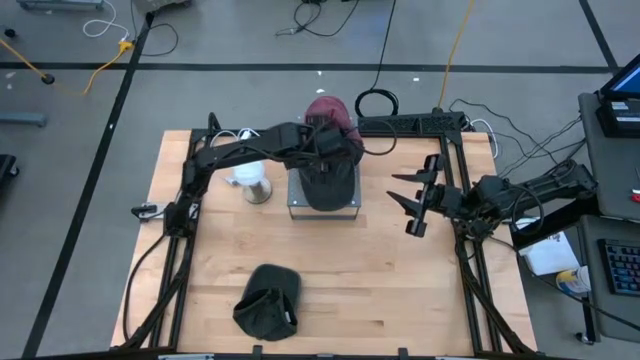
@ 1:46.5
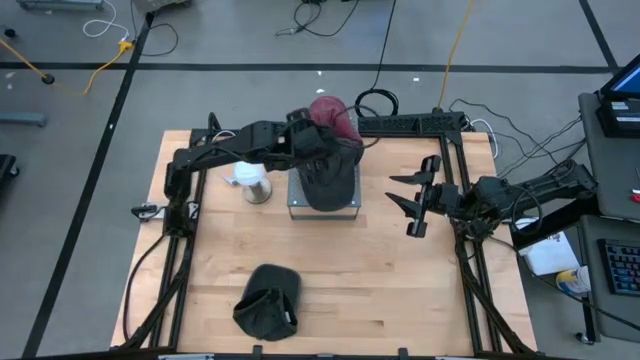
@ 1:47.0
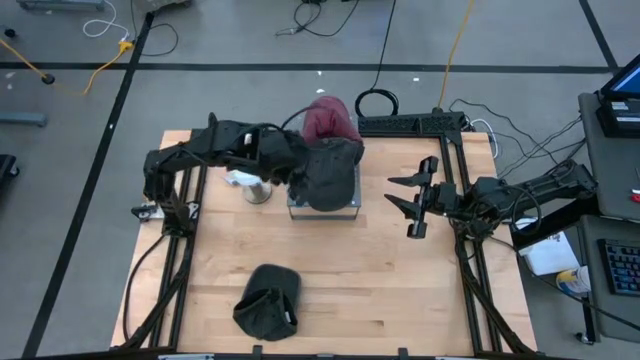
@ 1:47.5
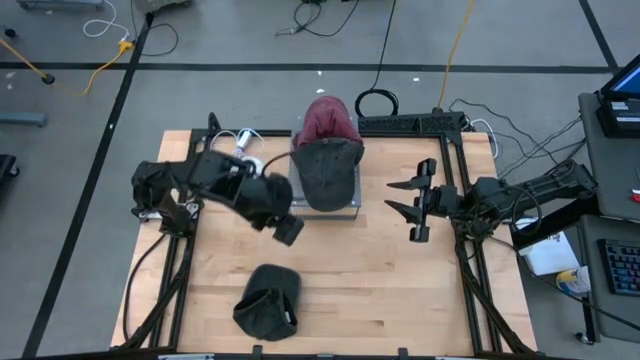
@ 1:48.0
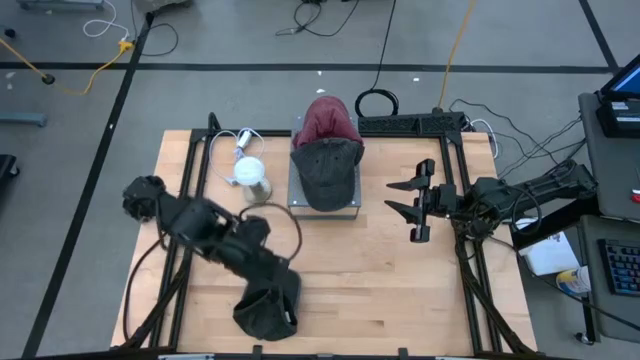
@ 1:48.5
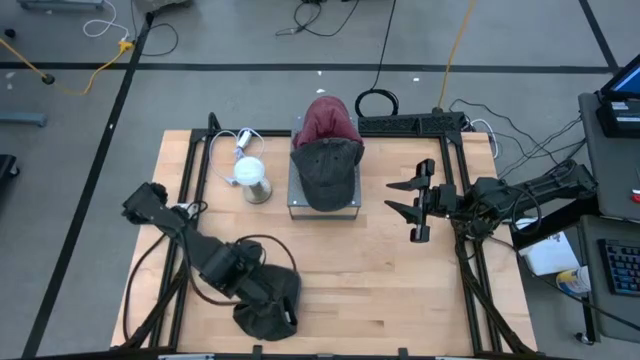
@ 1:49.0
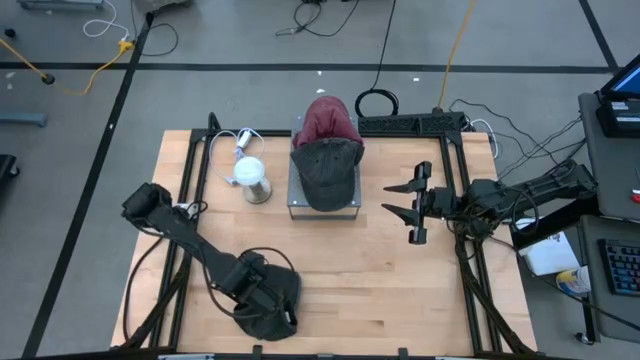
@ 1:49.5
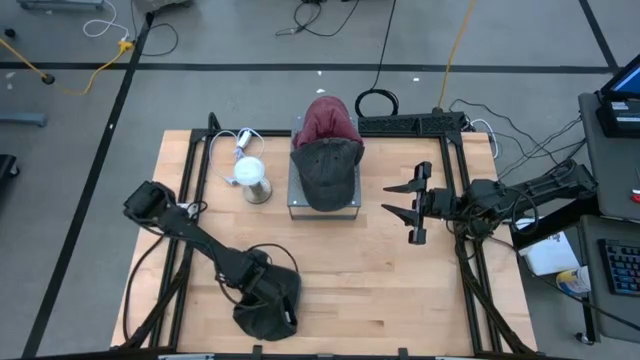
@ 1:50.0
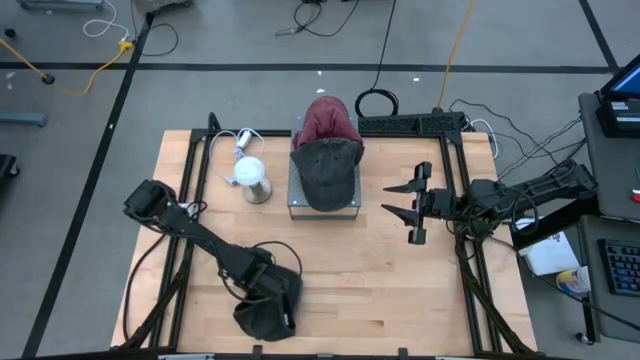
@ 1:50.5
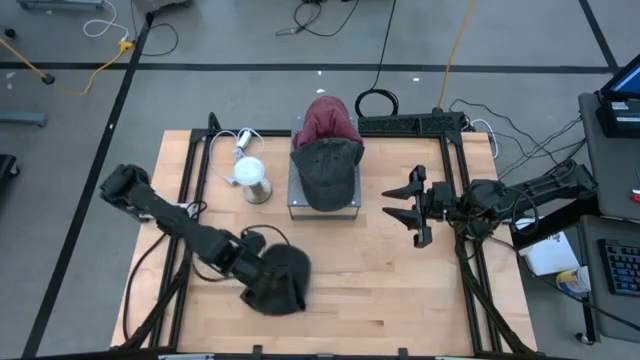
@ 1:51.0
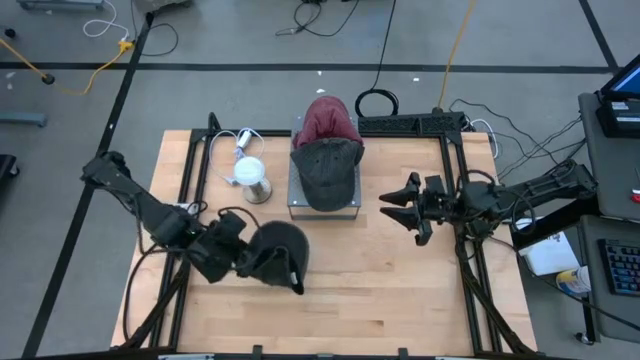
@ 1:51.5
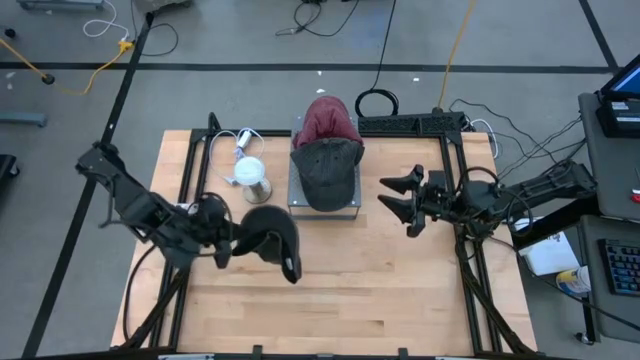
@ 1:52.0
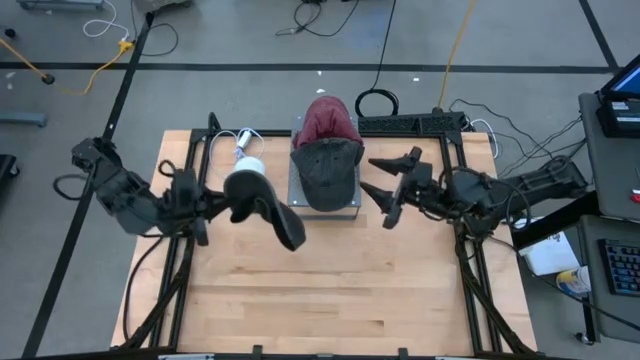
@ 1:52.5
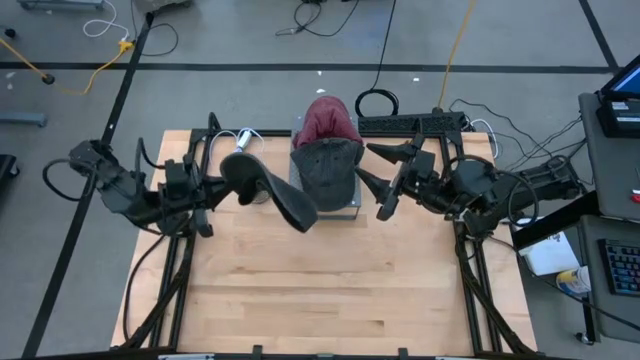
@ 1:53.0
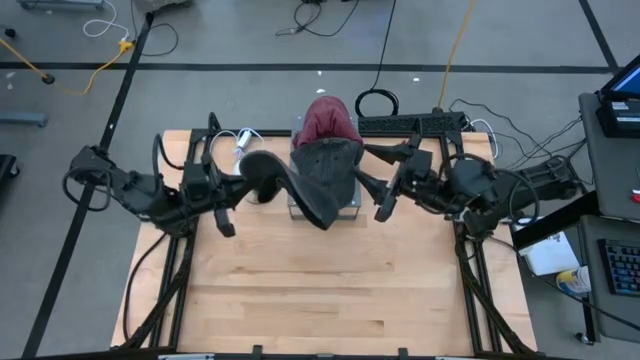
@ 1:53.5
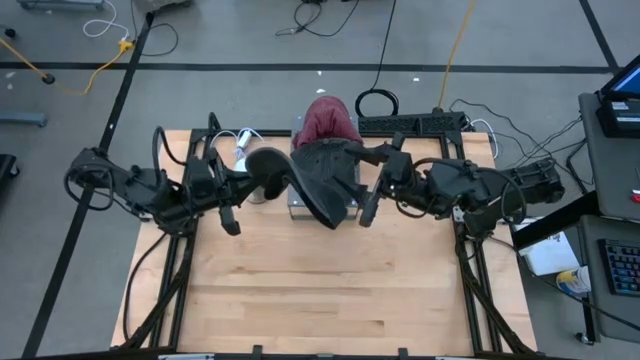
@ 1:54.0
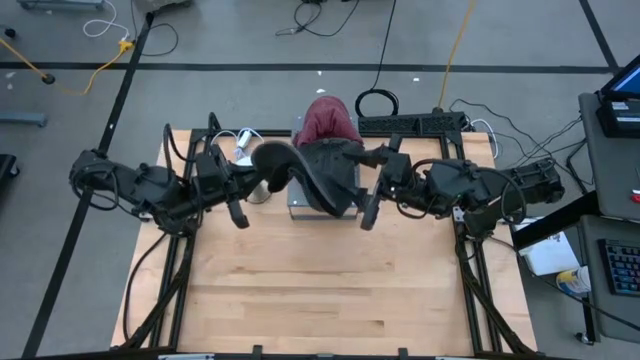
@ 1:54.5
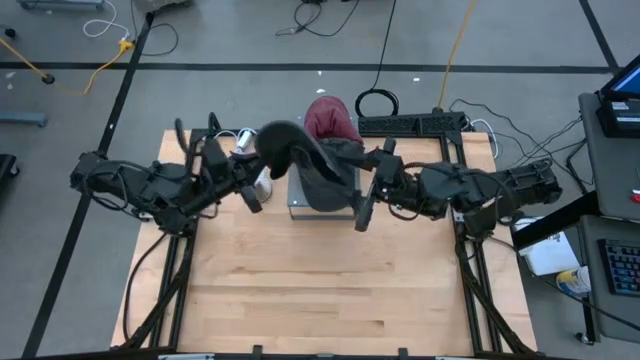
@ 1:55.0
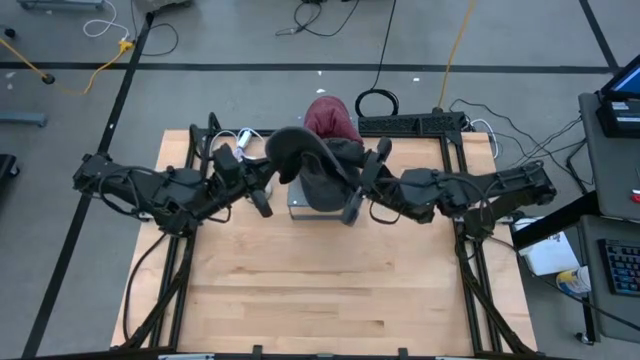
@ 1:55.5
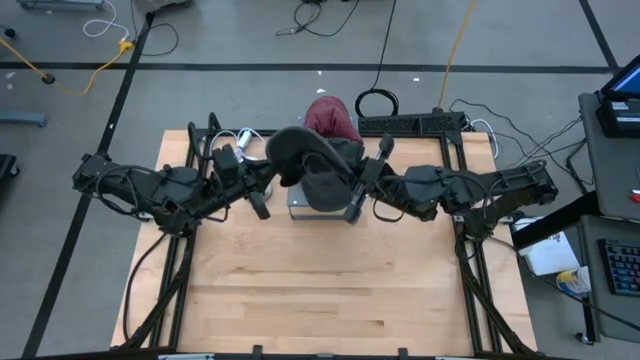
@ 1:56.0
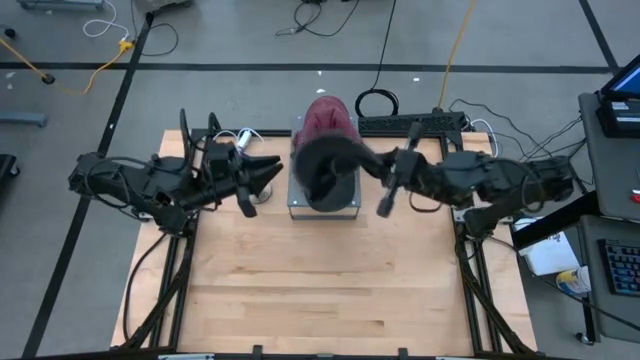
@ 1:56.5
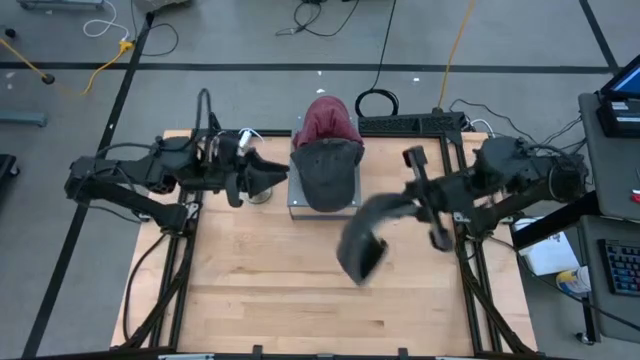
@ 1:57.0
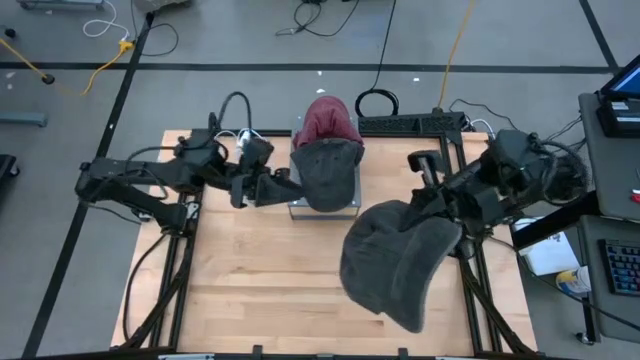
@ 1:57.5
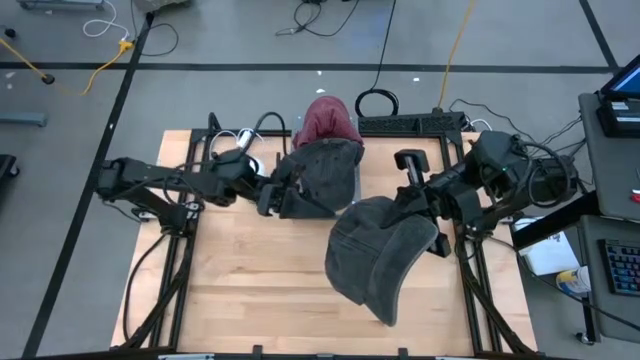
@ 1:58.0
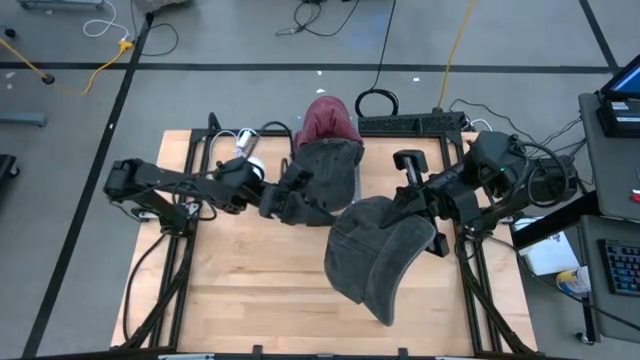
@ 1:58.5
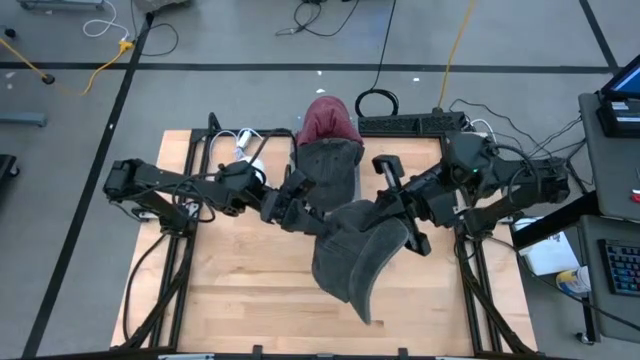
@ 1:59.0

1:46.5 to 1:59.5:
Task: Pick & Place hat
Stack the black cap on top of the black cap on the shelf

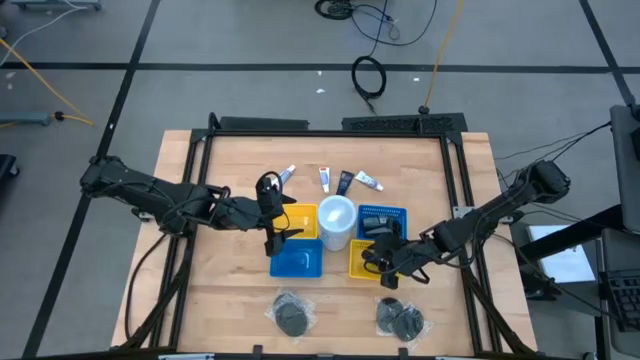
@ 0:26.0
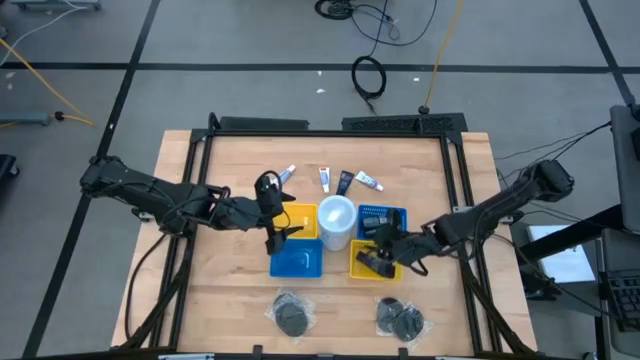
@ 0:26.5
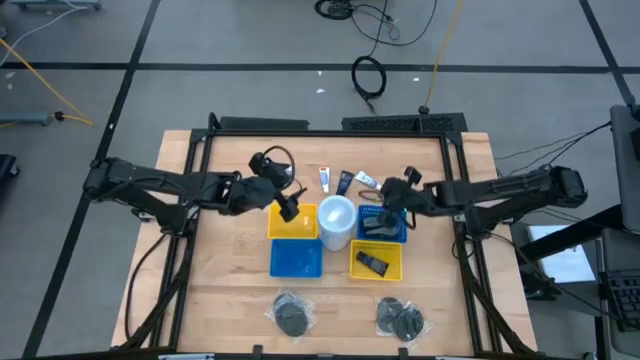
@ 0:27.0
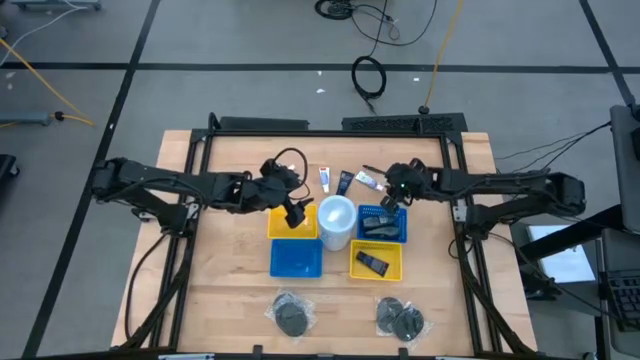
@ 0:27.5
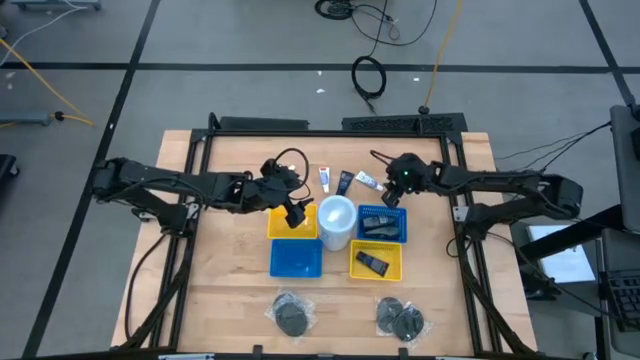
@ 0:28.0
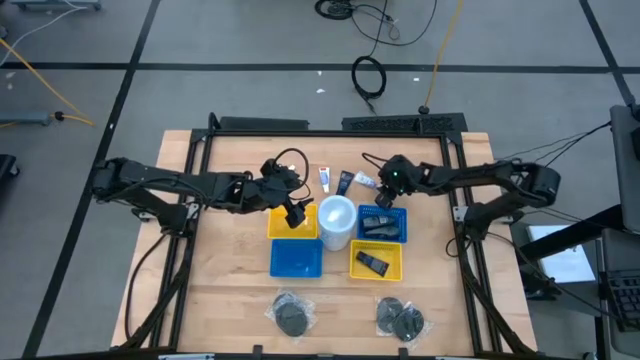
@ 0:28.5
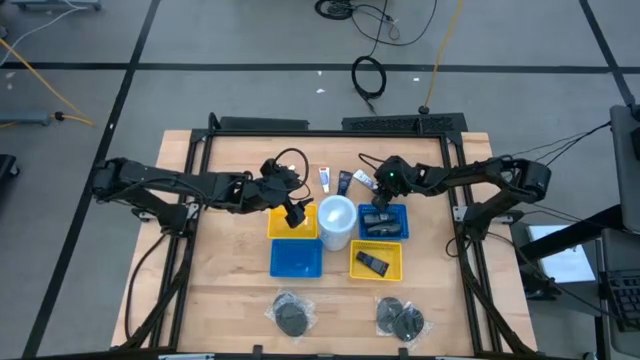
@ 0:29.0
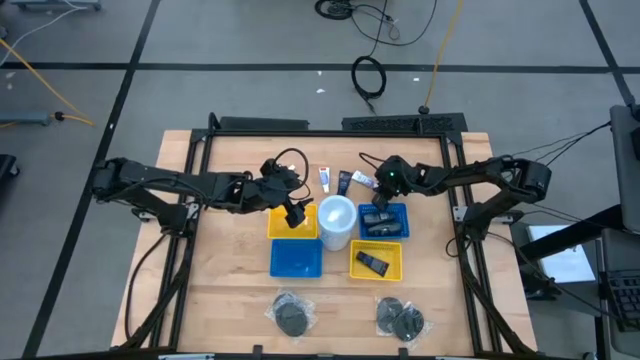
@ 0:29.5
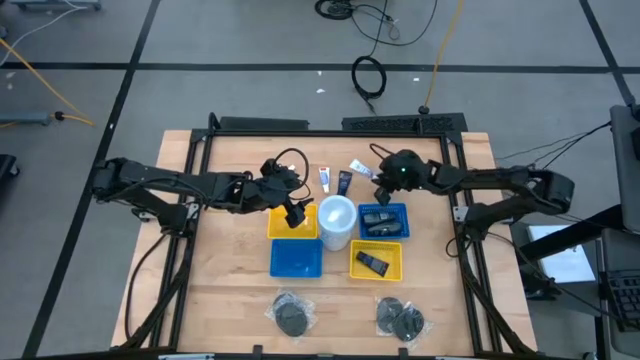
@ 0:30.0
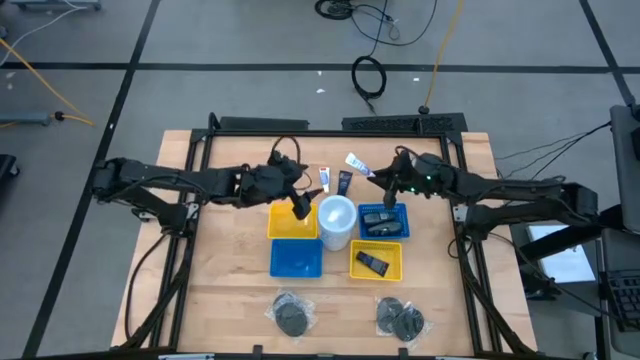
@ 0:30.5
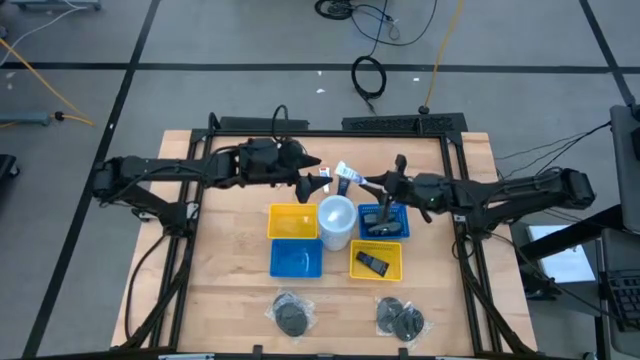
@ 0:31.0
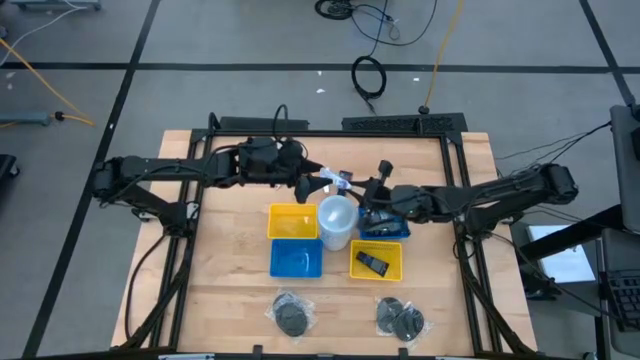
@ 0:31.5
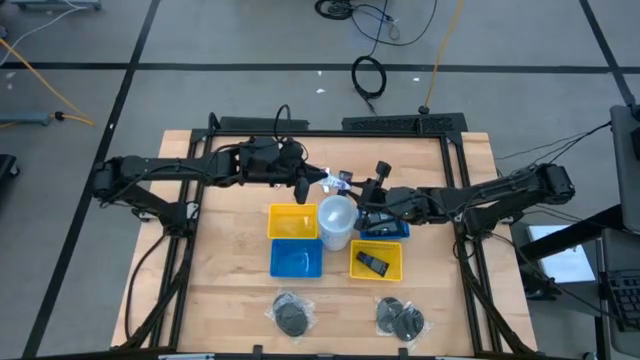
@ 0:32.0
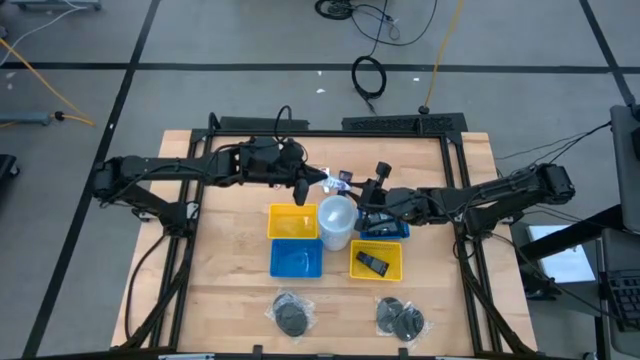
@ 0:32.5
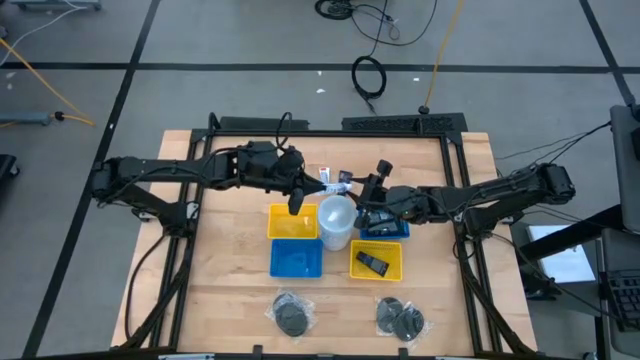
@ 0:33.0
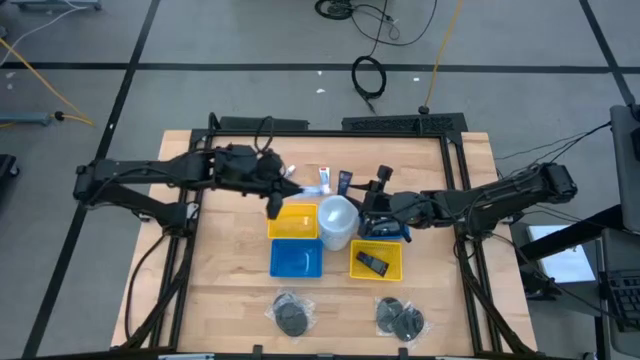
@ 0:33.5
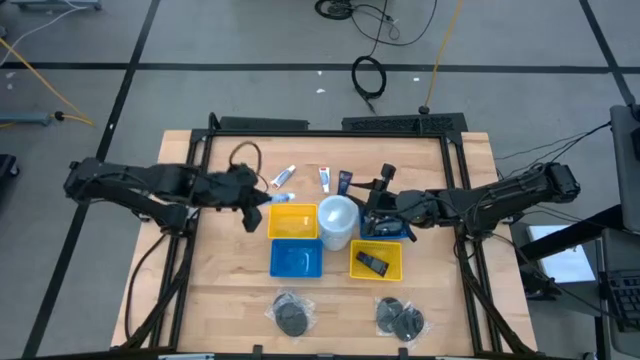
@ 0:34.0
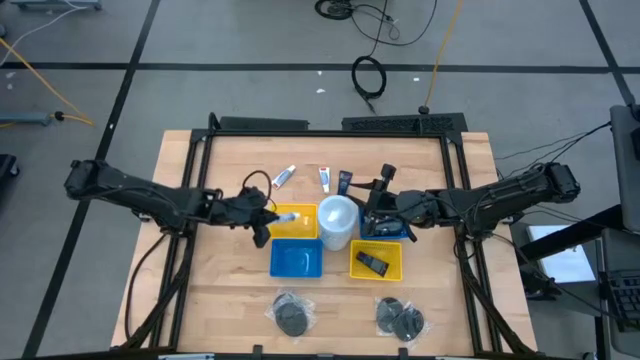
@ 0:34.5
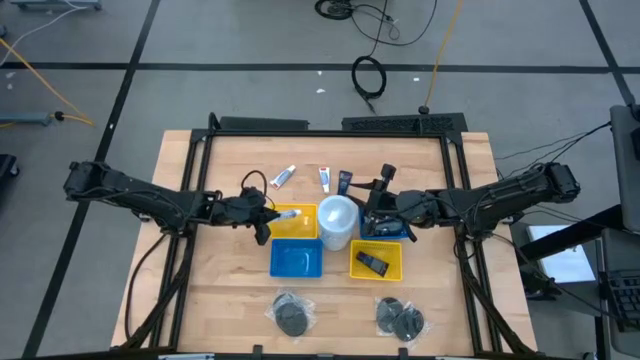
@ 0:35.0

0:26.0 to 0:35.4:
Task: Pick & Place Travel size toiletries
Put the white toothpaste into the top yellow bin
